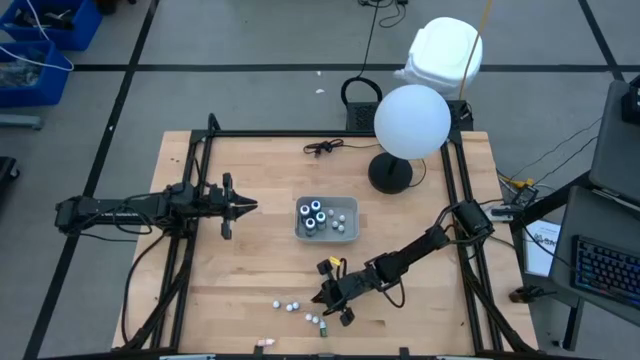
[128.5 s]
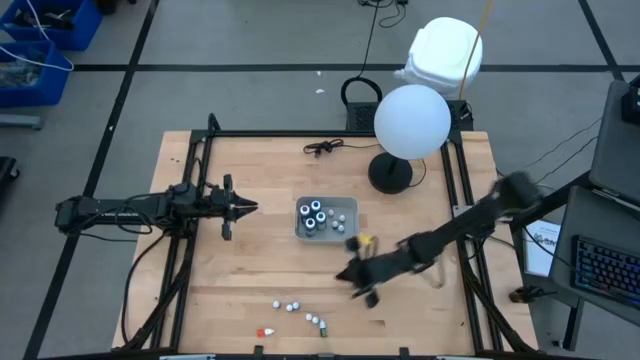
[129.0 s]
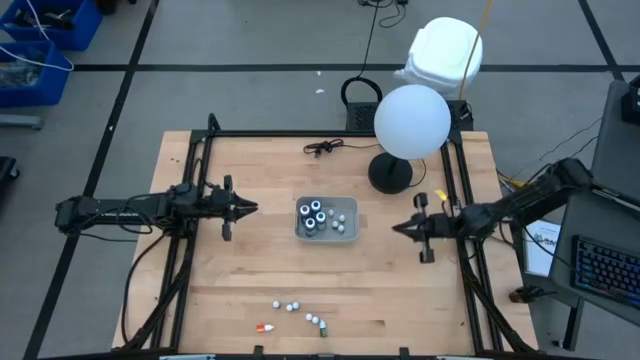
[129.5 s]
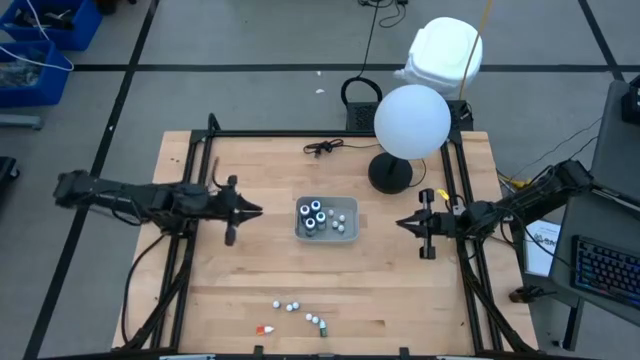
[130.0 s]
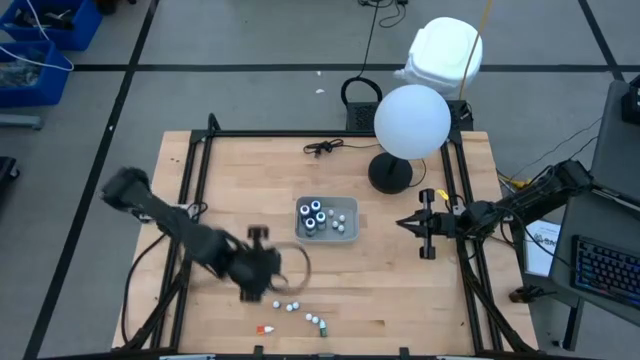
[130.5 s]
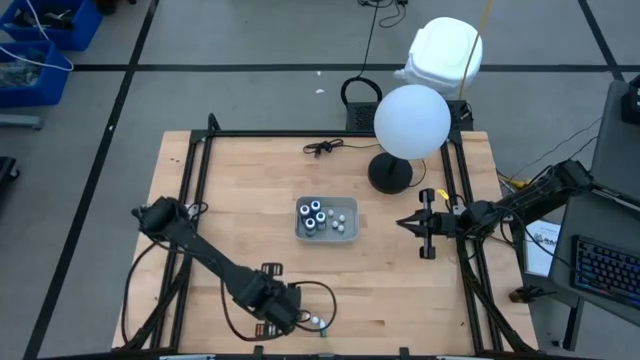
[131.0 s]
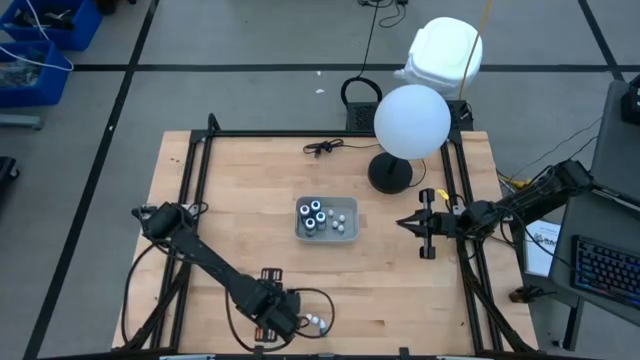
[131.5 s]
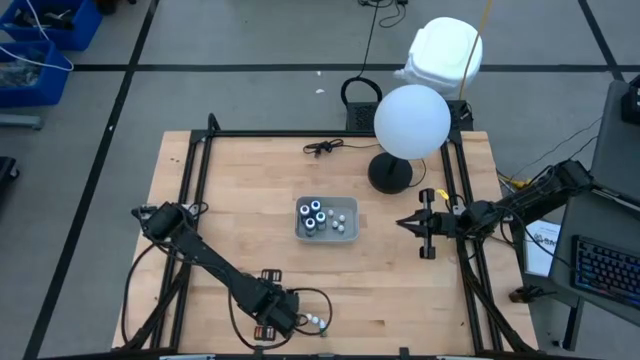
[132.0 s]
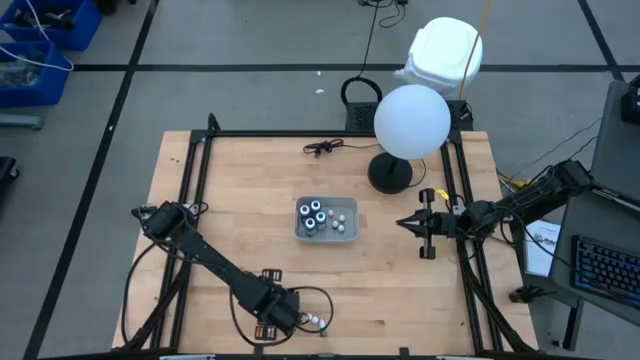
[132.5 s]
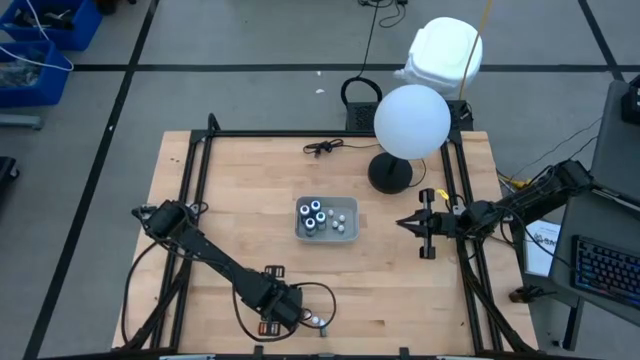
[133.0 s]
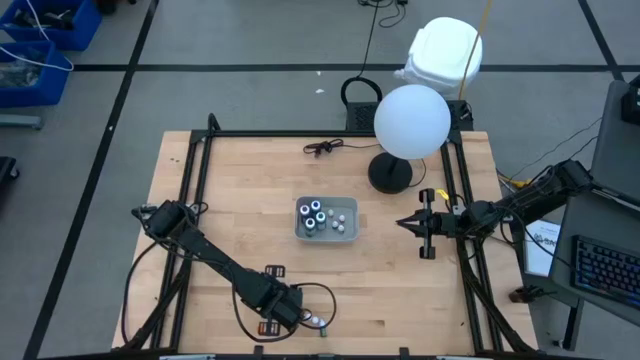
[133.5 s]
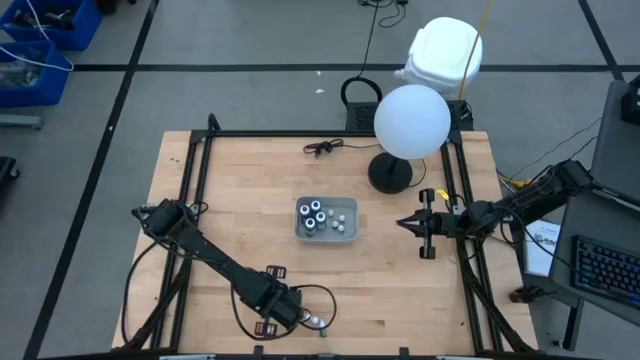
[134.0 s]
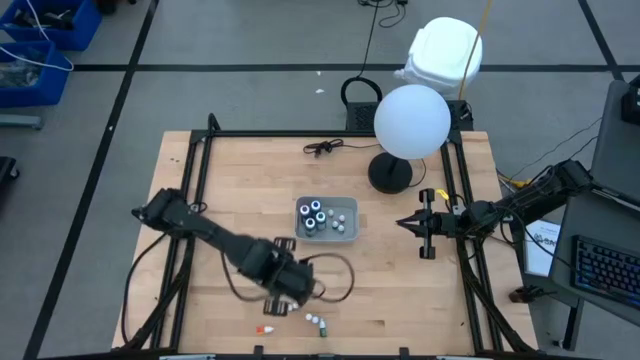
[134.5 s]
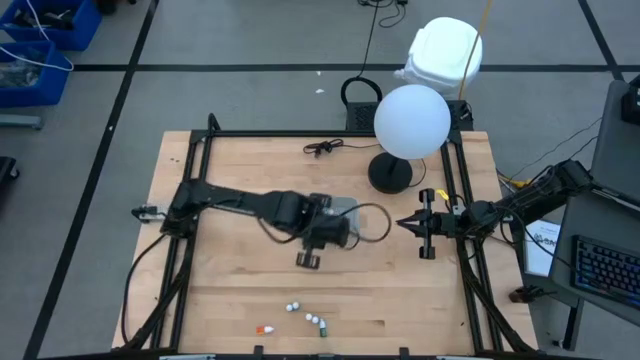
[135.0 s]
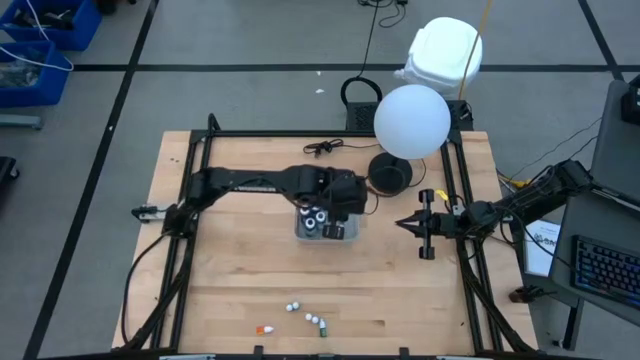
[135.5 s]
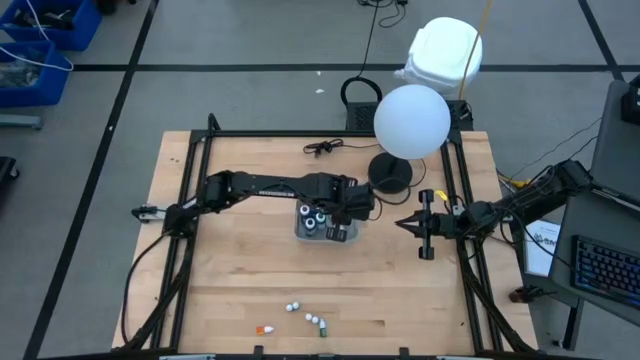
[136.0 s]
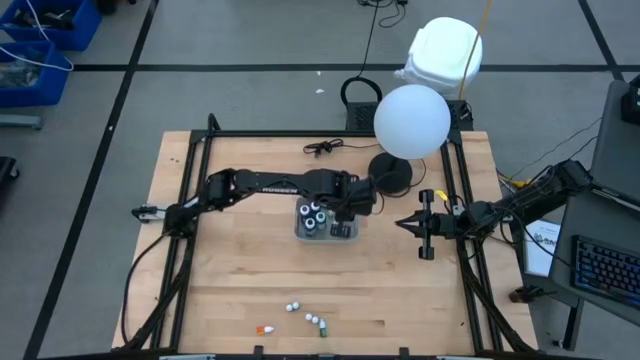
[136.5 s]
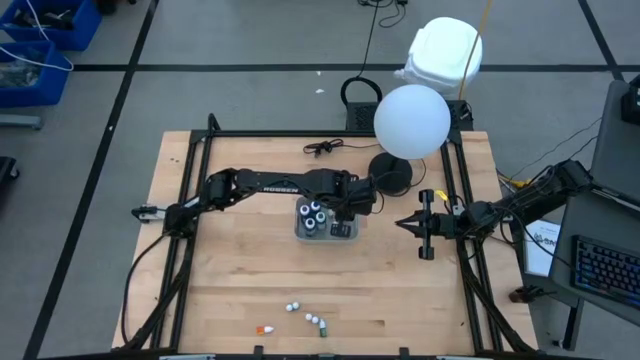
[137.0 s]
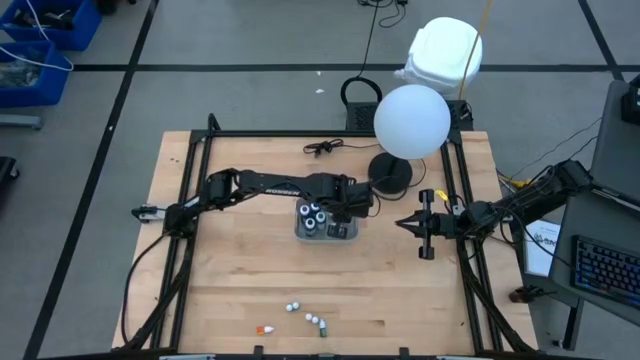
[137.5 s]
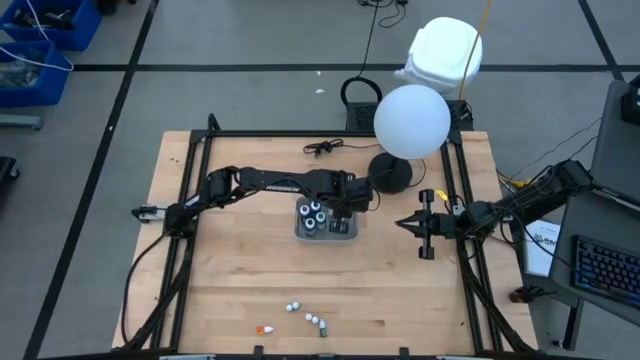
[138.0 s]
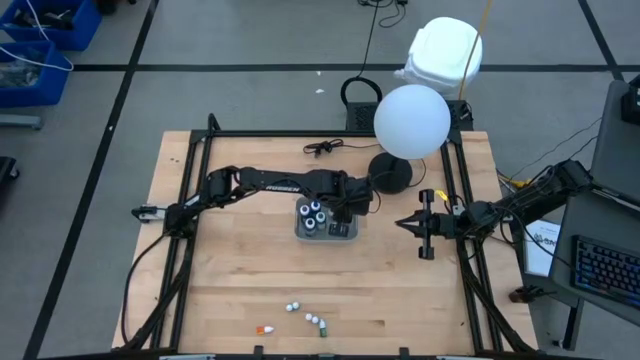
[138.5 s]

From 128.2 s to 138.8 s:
Task: Pick & Place food coloring
Put the left small violet food coloring bottle into the gray bin

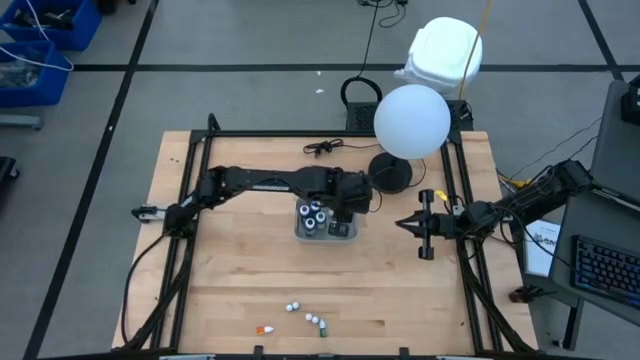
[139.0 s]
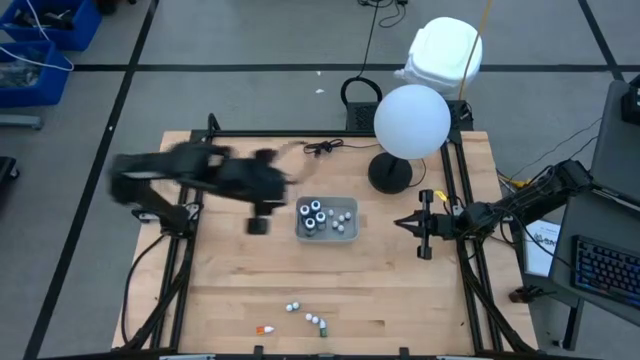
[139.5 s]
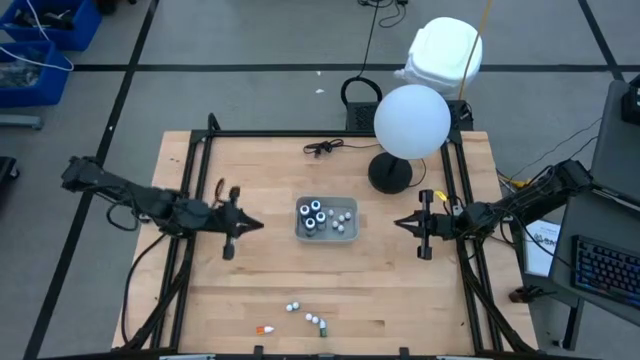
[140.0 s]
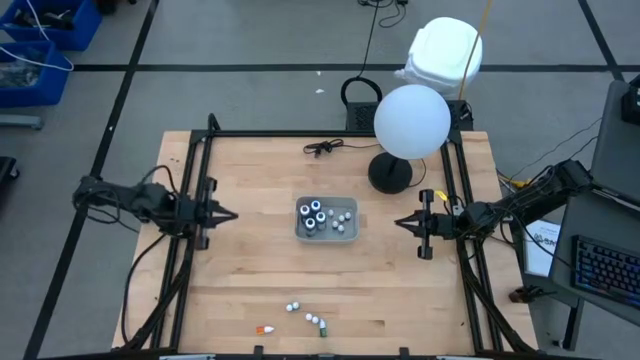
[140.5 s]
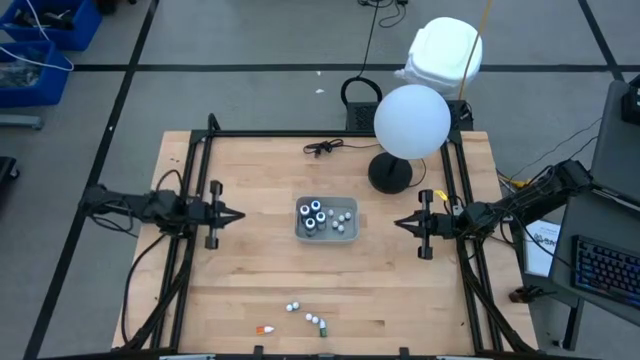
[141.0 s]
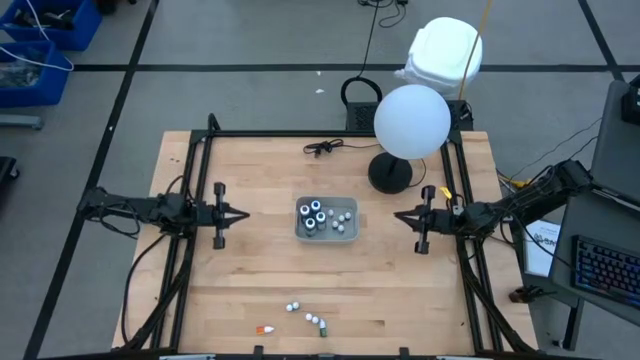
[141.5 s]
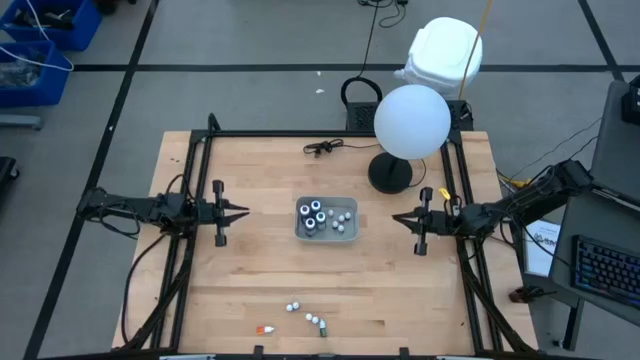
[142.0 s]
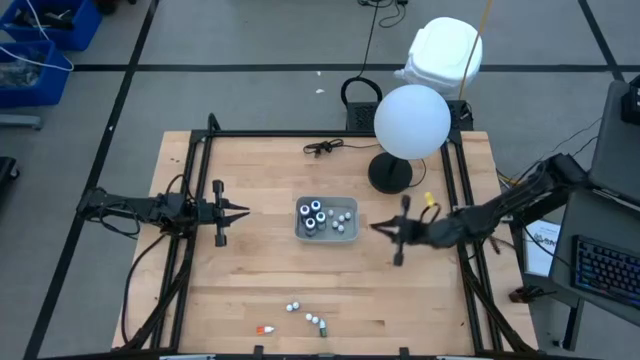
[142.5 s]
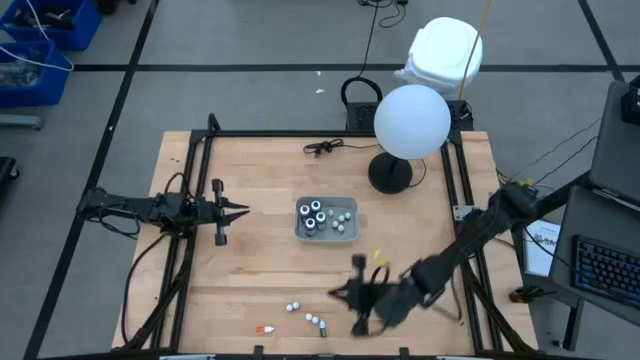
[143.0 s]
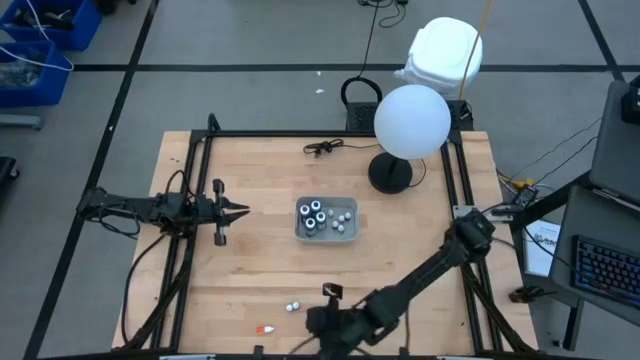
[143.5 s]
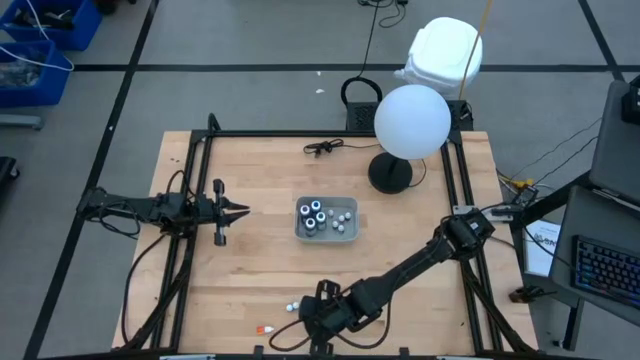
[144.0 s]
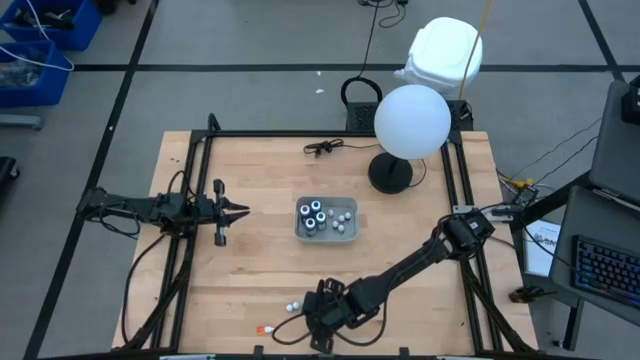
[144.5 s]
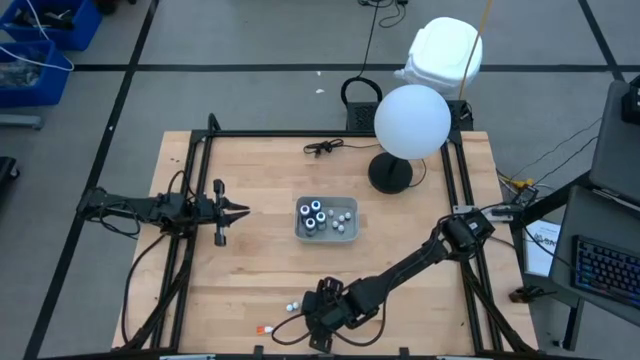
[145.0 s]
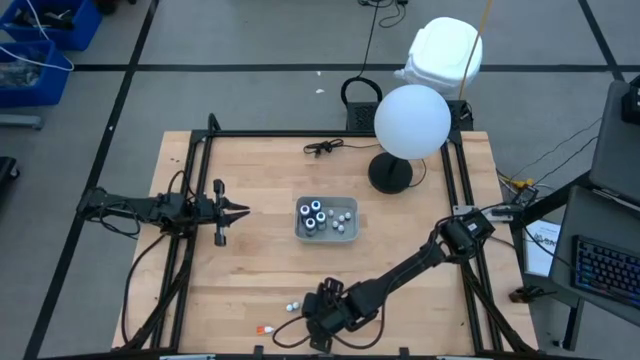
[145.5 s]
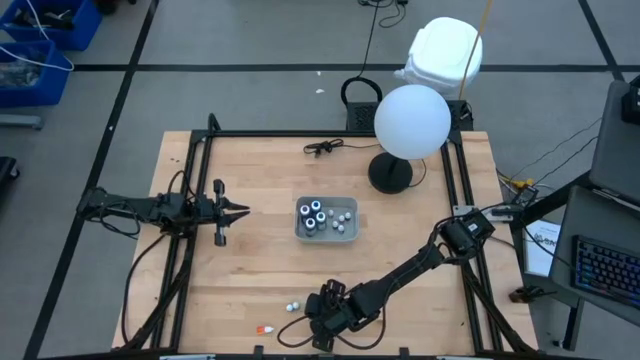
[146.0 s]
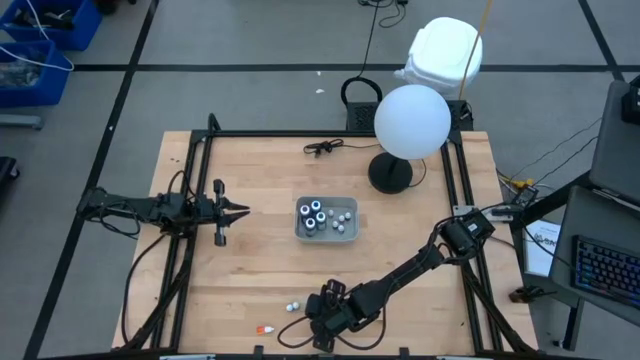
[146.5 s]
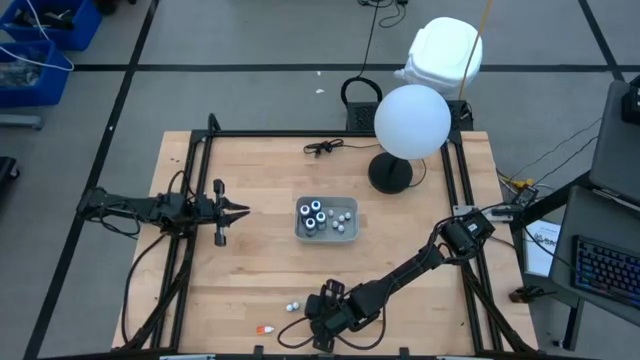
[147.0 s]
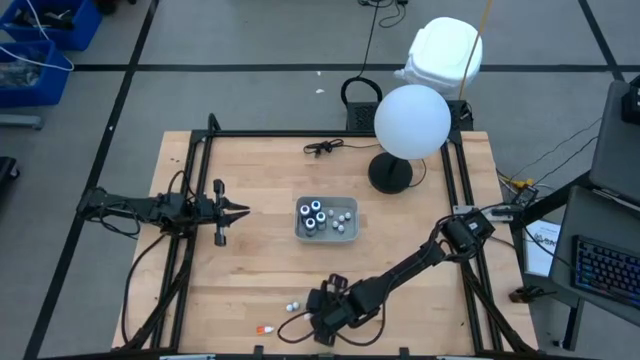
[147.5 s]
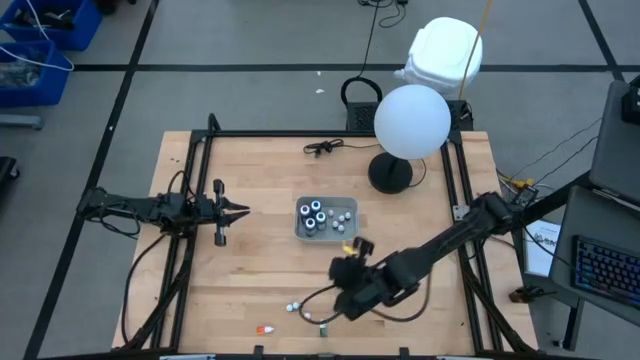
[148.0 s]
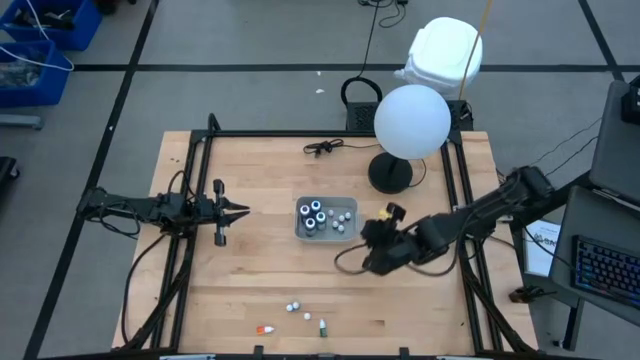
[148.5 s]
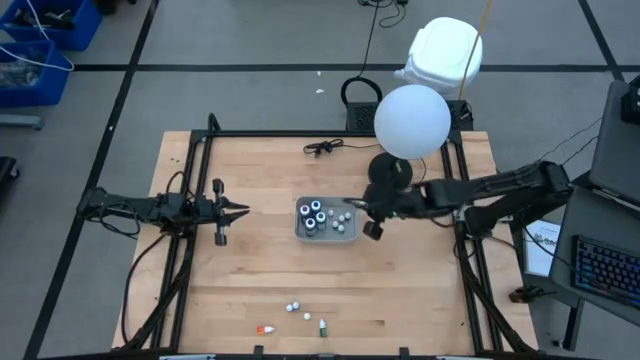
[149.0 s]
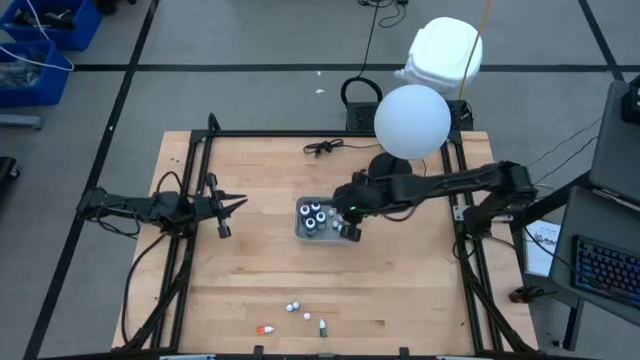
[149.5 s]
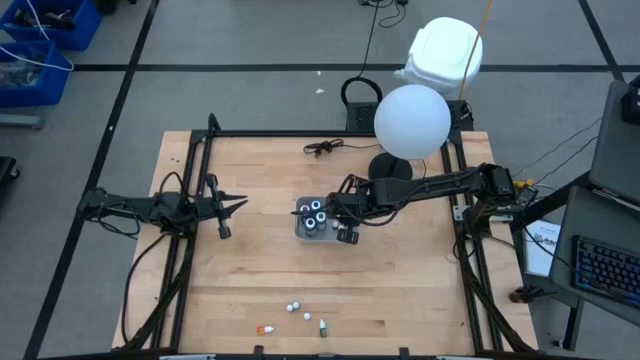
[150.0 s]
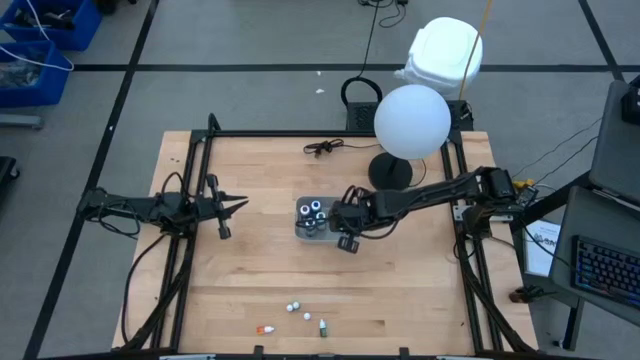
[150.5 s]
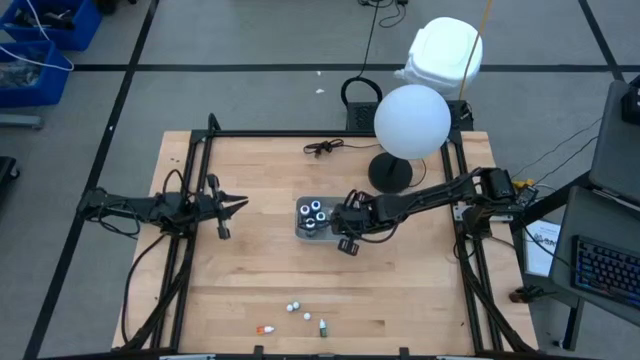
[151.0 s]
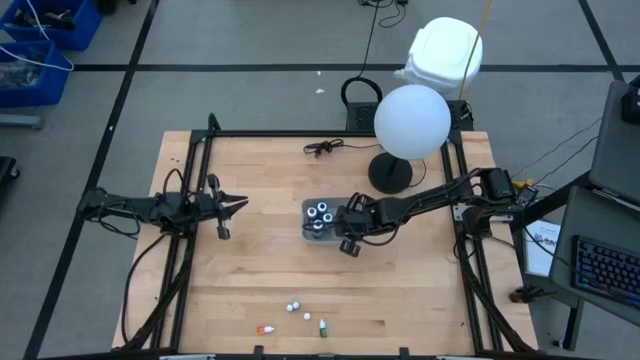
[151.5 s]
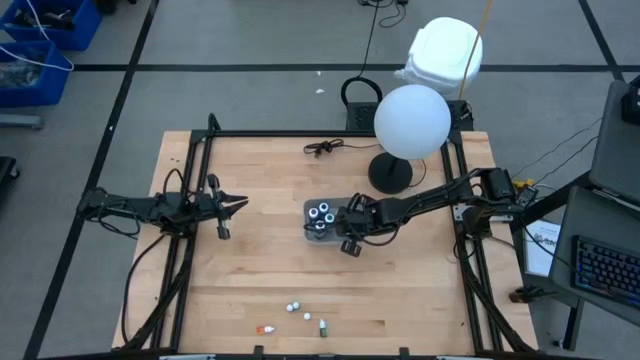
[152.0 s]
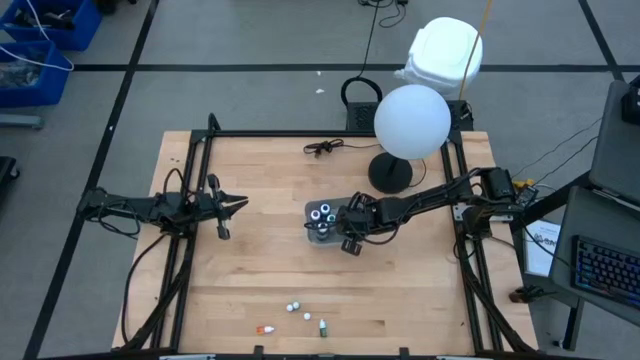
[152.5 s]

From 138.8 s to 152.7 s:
Put the small violet food coloring bottle into the gray bin
